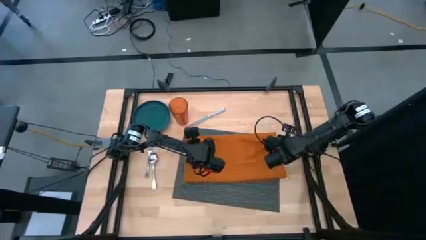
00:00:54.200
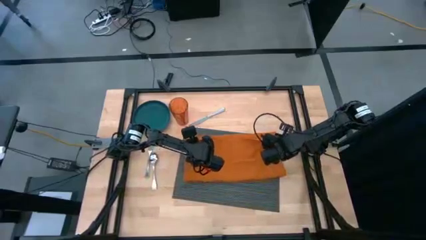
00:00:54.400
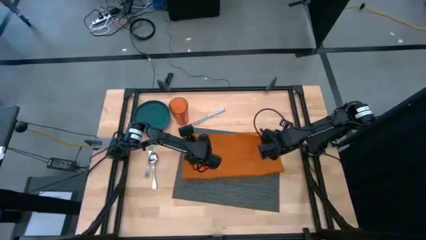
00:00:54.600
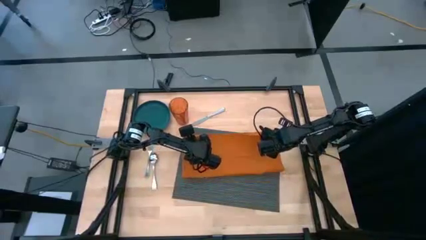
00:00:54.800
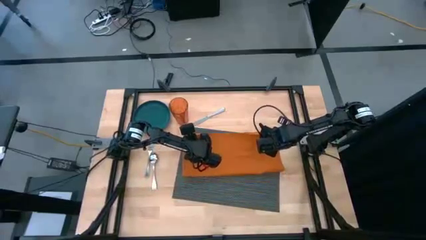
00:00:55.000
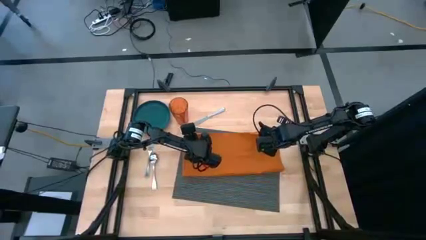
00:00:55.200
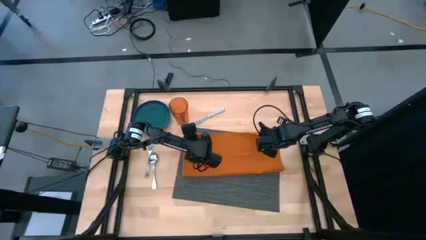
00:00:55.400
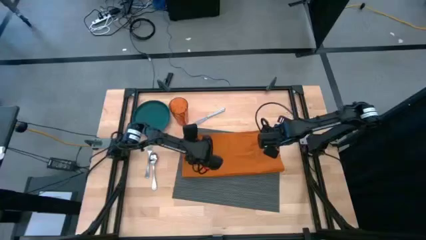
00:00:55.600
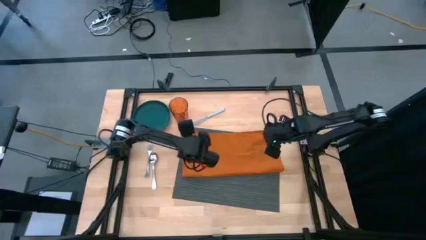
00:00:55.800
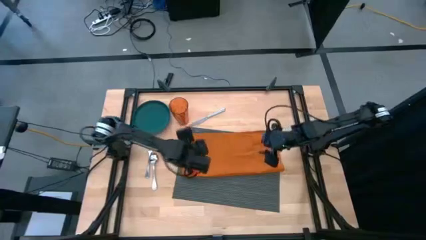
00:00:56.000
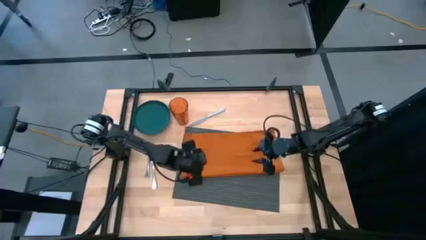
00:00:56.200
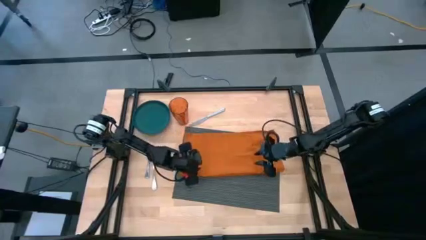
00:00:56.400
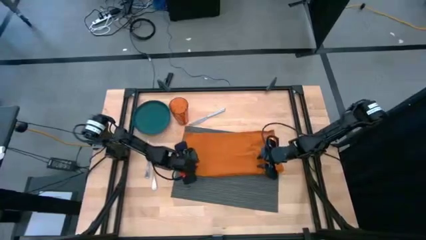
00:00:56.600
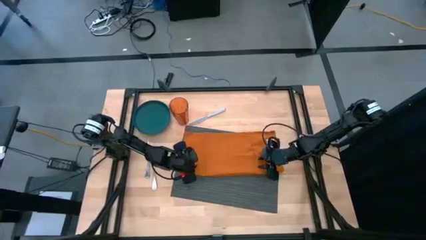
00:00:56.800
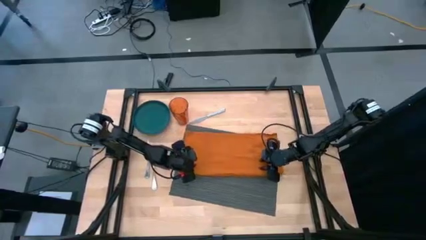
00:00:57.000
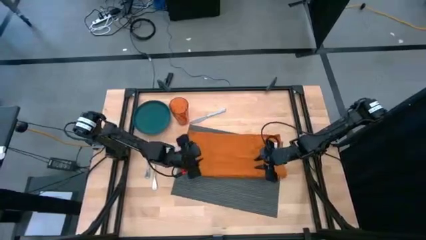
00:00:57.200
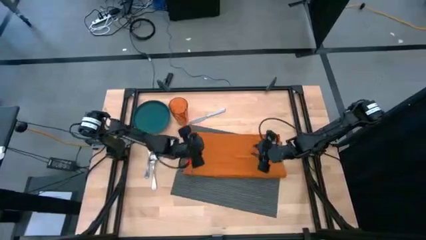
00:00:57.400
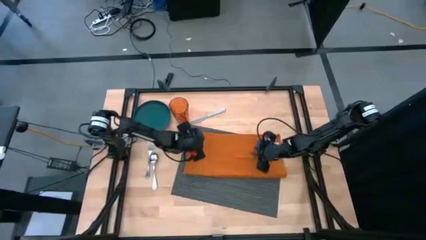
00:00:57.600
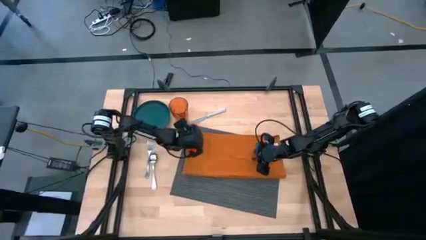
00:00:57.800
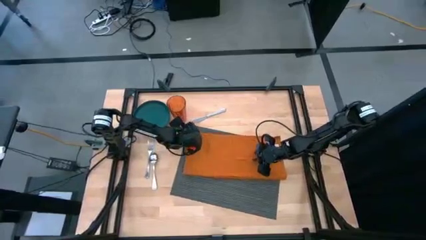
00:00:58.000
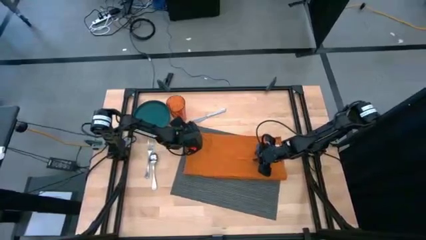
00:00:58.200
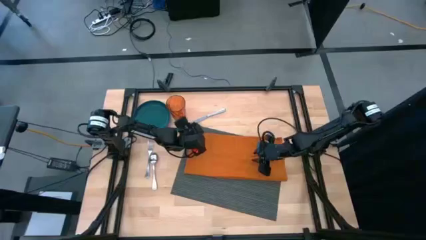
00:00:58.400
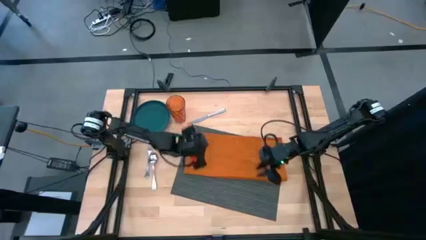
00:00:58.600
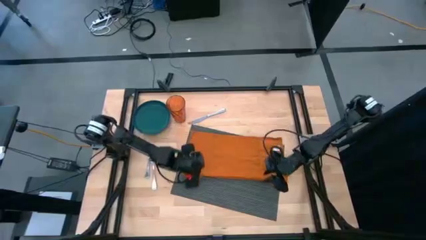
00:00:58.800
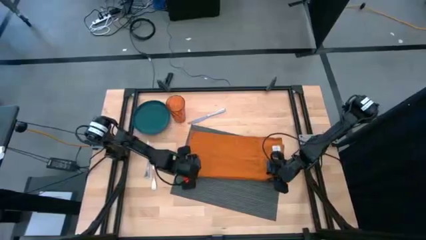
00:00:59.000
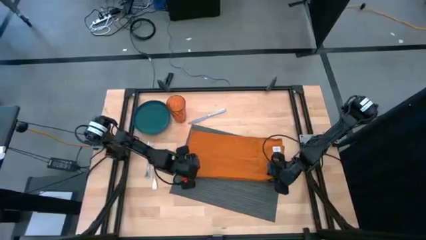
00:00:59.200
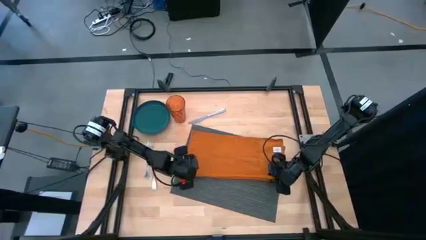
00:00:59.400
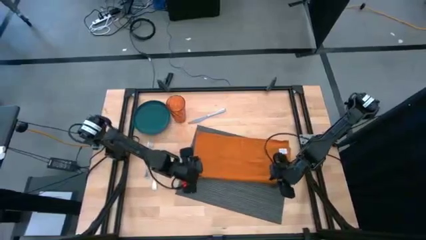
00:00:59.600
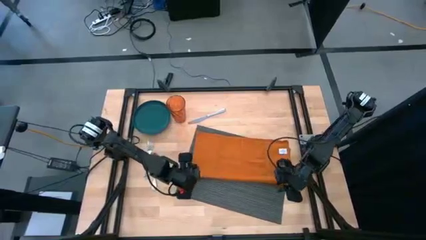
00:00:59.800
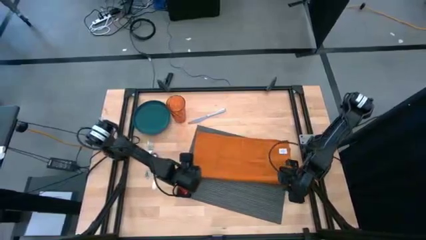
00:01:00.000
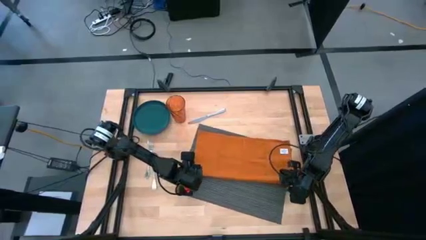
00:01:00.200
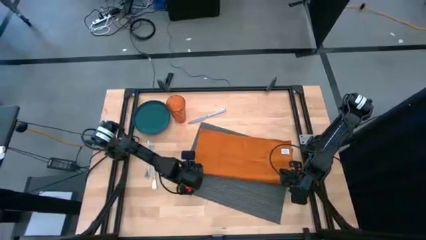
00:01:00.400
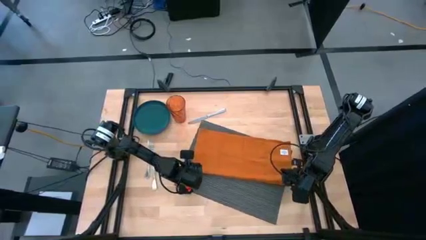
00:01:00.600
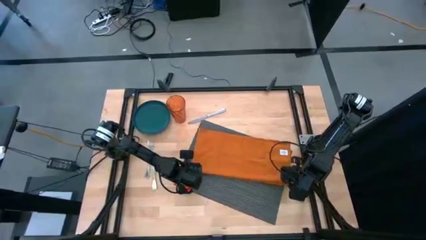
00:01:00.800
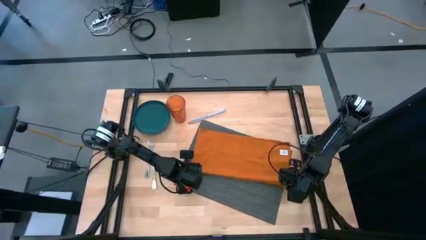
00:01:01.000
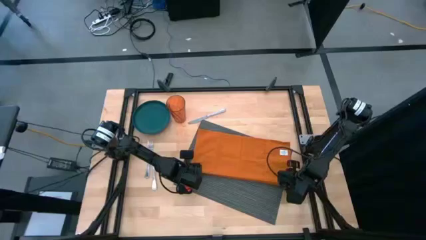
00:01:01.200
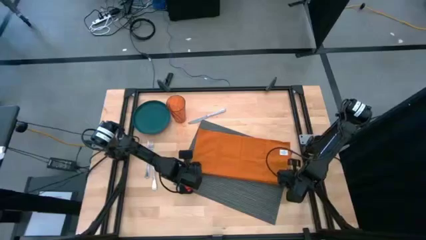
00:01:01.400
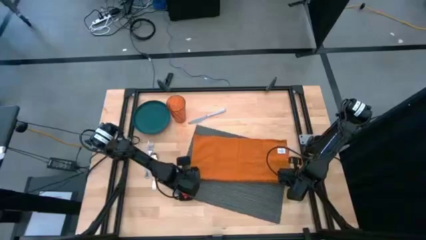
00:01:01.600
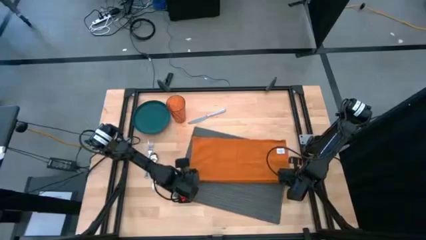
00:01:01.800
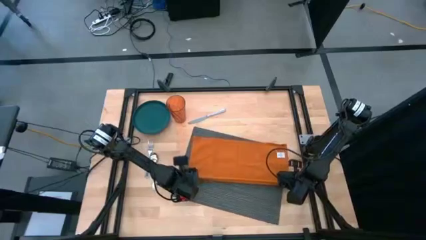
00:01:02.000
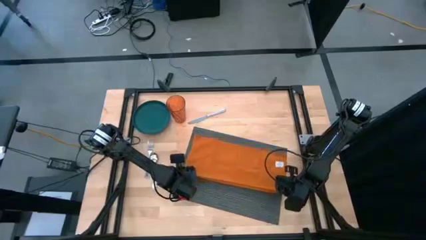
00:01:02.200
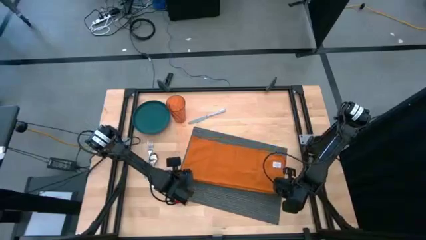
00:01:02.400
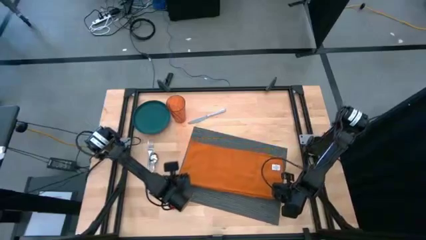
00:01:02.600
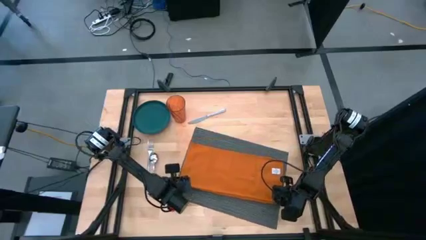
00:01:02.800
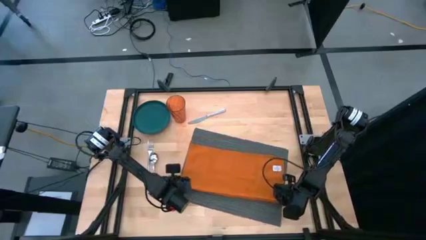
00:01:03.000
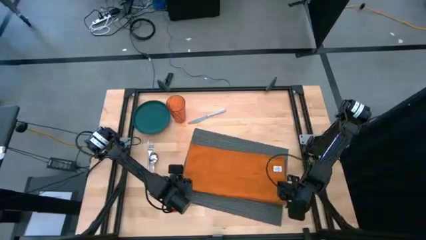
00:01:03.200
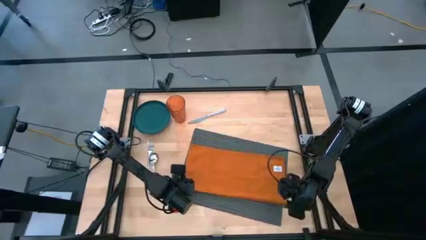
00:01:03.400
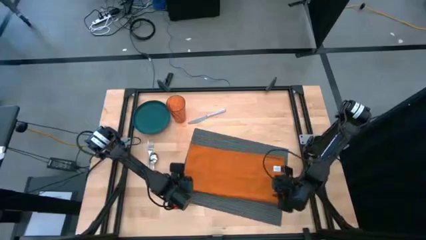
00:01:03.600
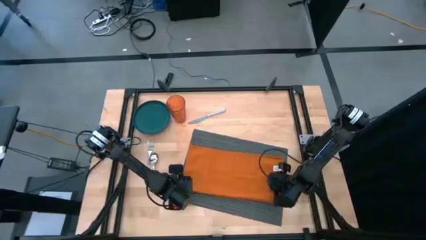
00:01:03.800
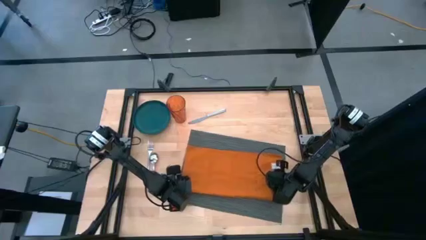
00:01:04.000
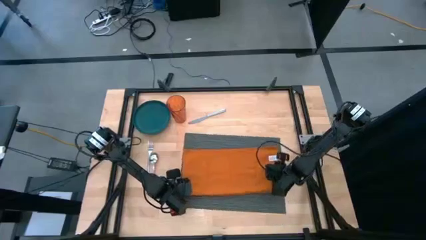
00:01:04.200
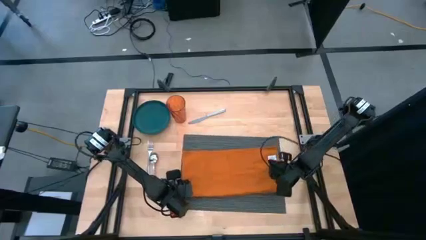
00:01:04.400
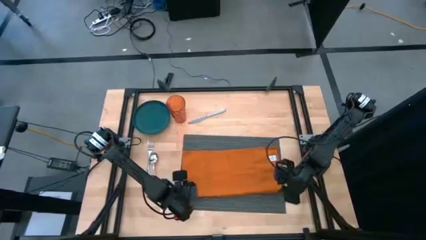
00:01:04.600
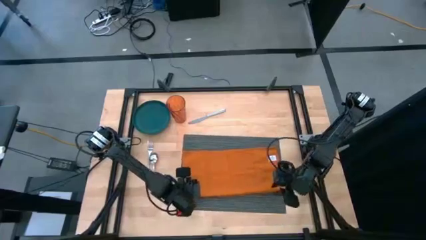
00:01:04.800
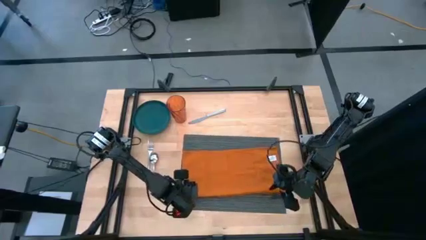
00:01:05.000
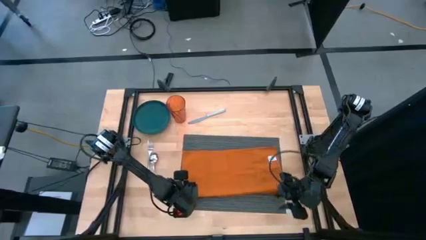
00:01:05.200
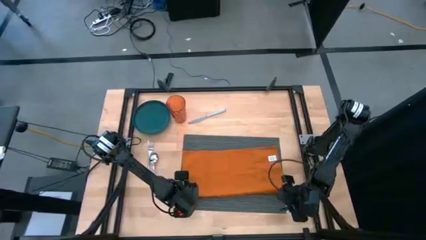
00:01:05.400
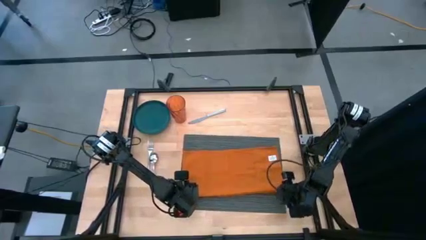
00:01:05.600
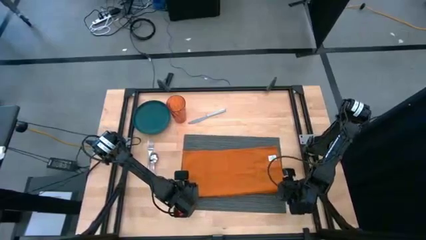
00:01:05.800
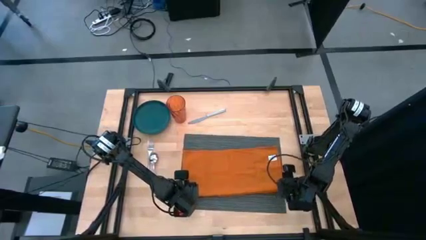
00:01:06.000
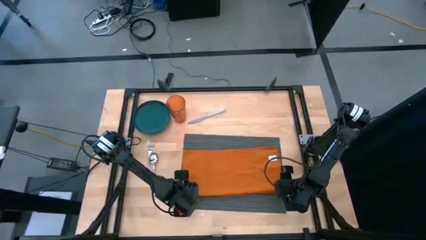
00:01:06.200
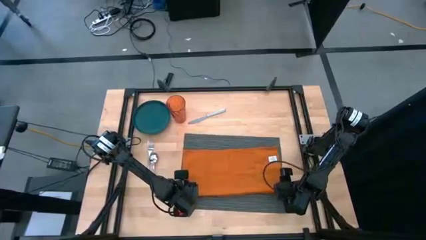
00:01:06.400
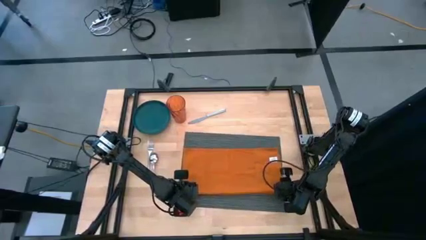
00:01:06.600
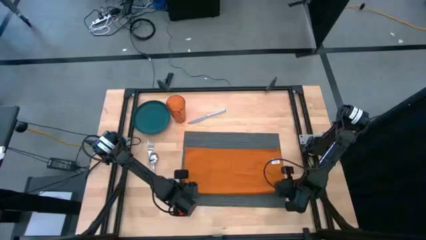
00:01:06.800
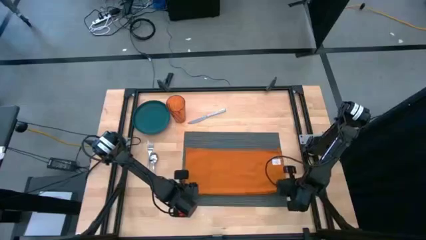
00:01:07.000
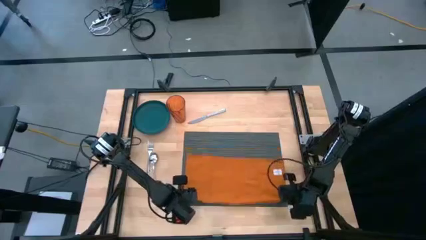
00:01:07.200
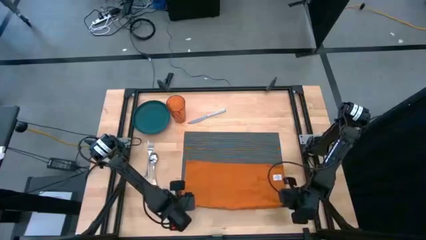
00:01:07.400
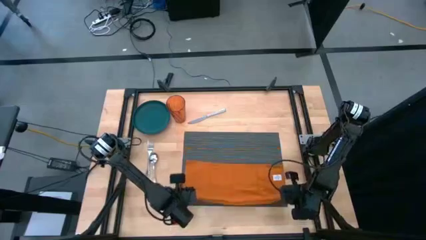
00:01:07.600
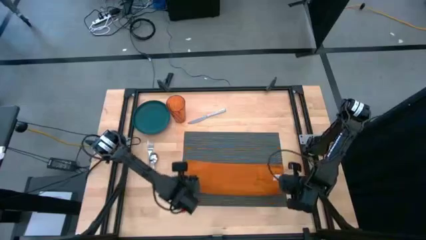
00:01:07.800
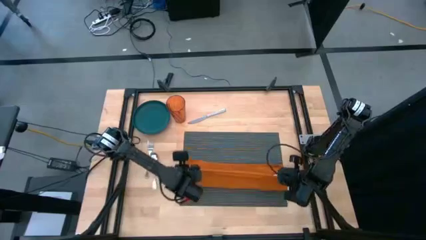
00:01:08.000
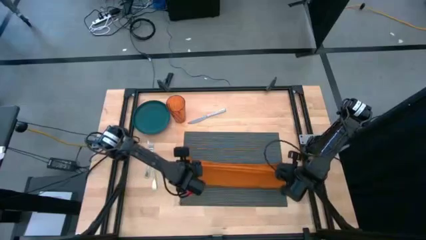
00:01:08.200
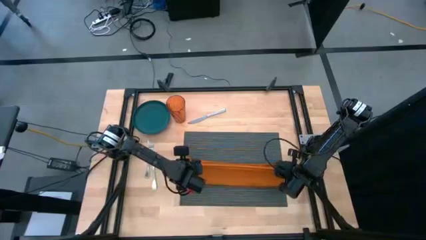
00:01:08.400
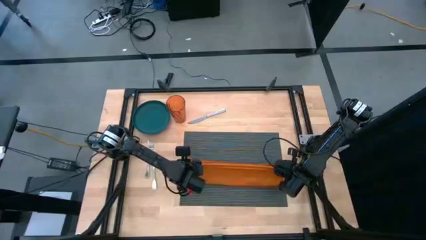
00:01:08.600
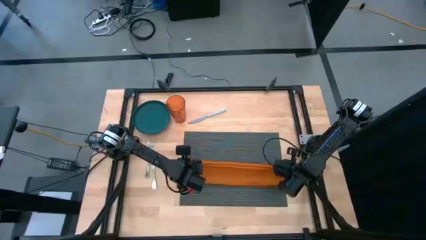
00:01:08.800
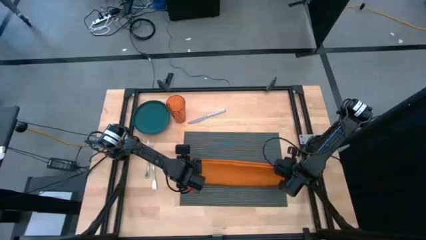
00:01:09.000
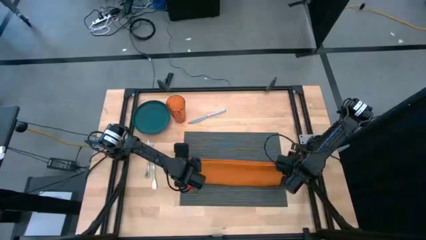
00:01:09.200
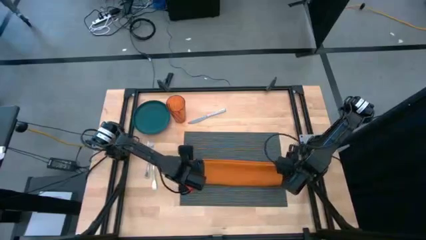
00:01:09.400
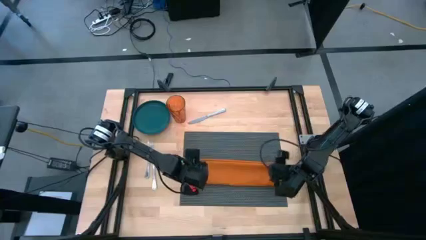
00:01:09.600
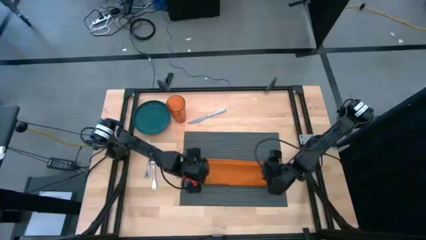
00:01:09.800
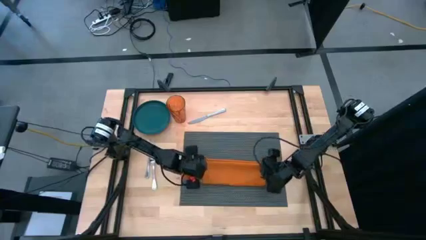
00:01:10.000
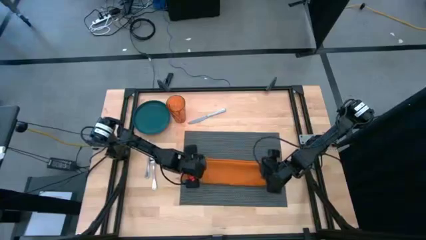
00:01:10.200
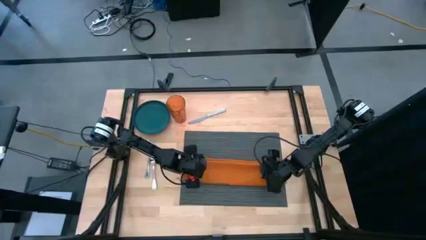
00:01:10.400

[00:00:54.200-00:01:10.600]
Task: Set table place
Fold the orange table napkin on the black placemat
